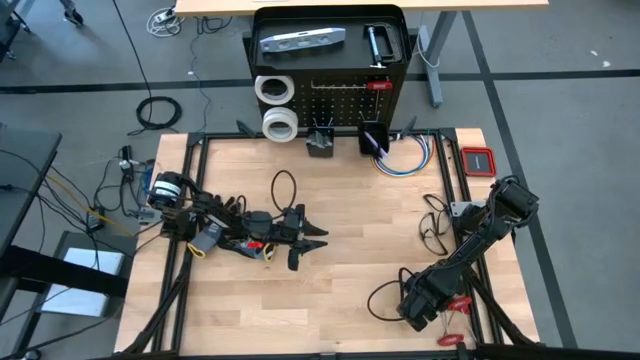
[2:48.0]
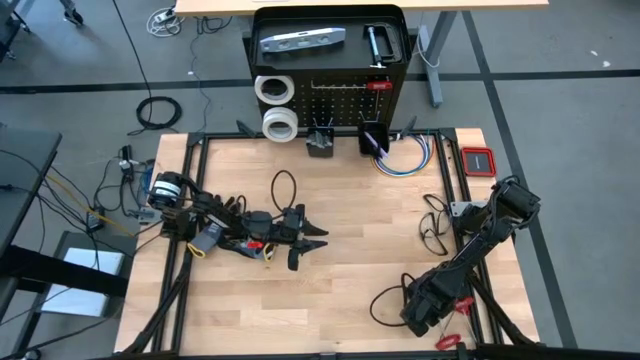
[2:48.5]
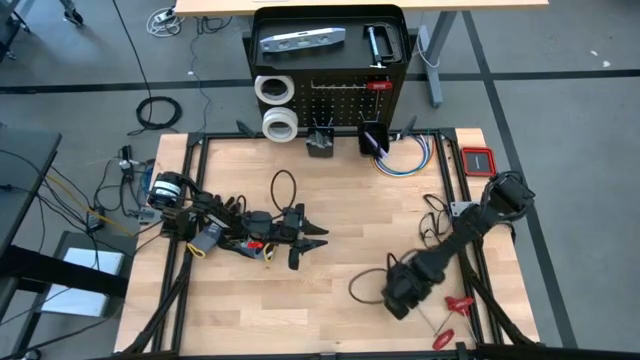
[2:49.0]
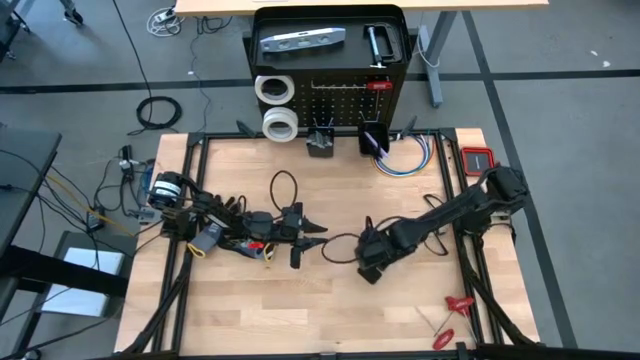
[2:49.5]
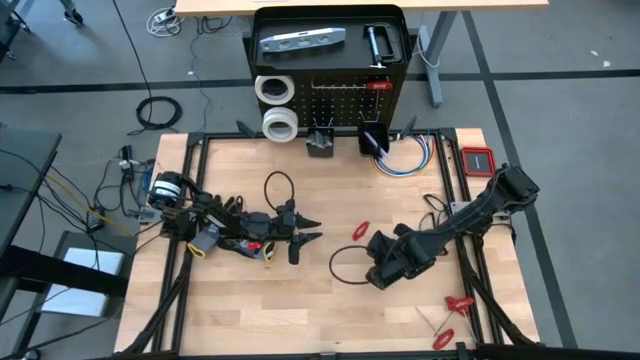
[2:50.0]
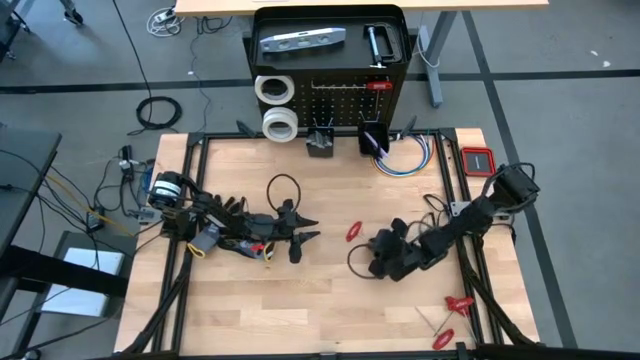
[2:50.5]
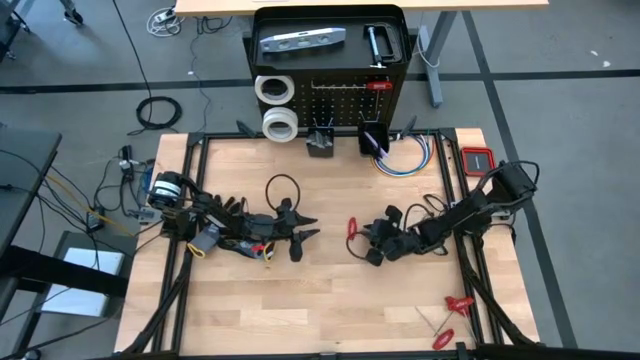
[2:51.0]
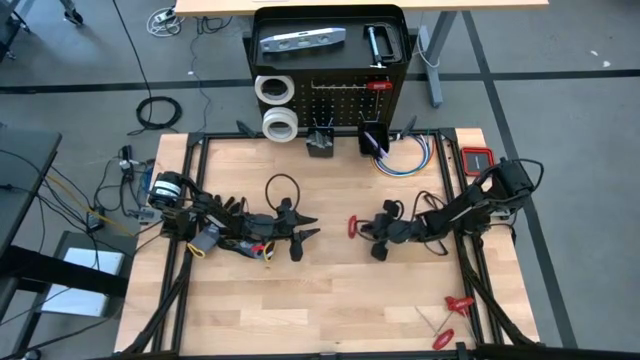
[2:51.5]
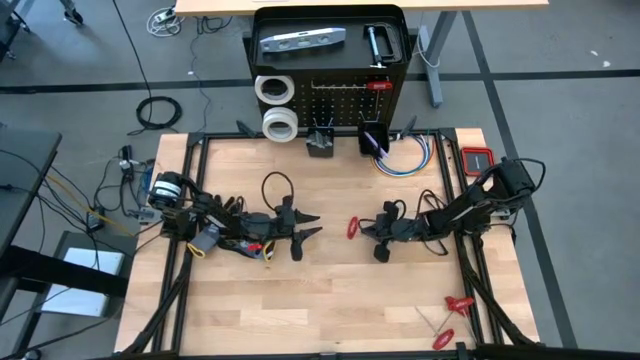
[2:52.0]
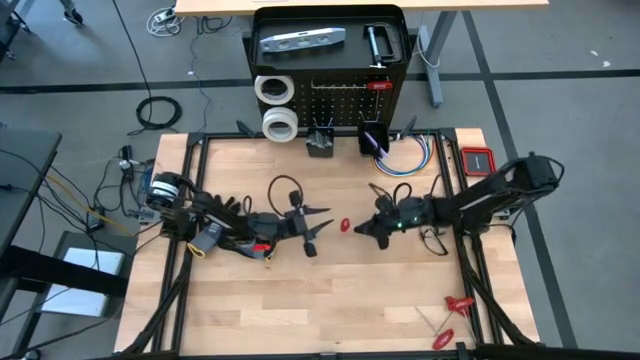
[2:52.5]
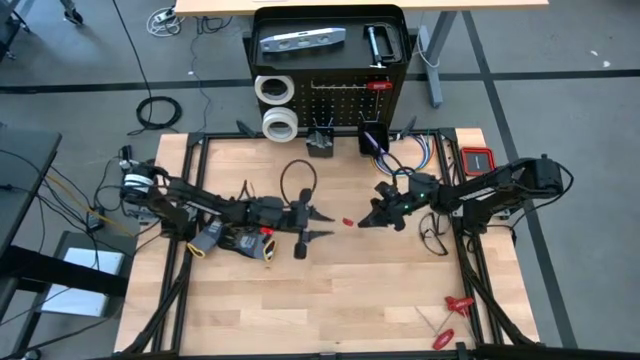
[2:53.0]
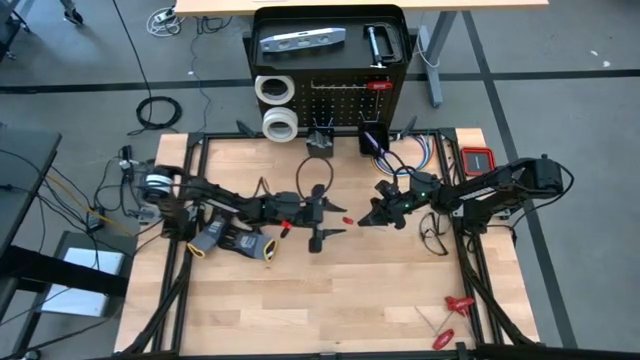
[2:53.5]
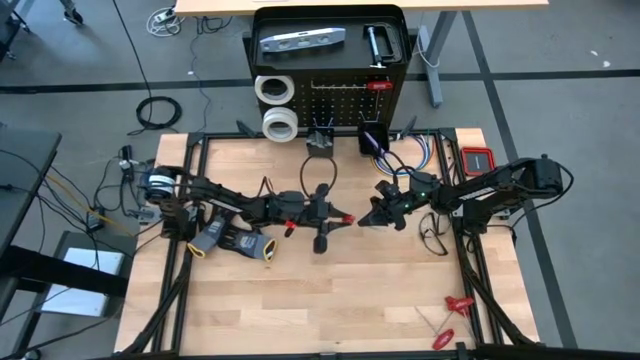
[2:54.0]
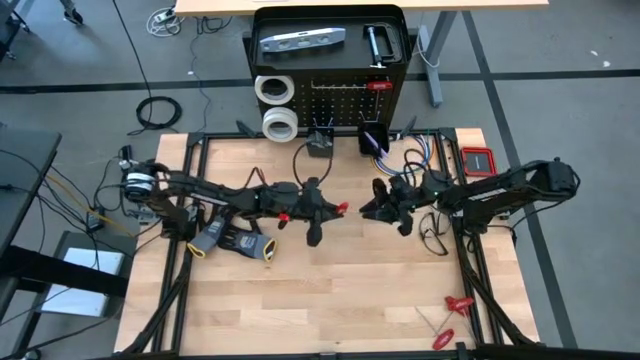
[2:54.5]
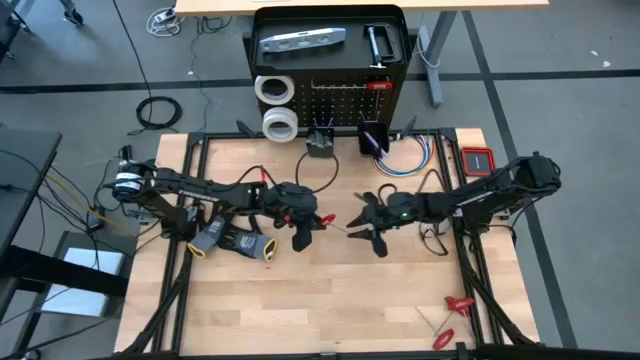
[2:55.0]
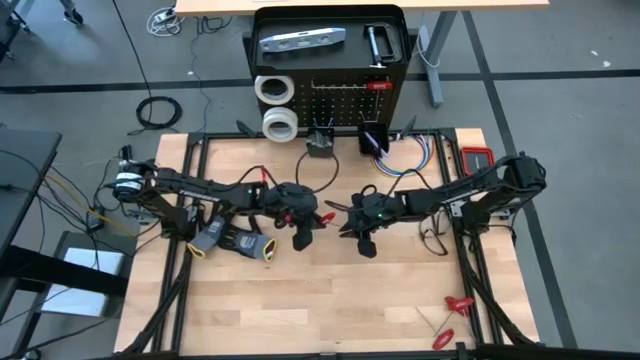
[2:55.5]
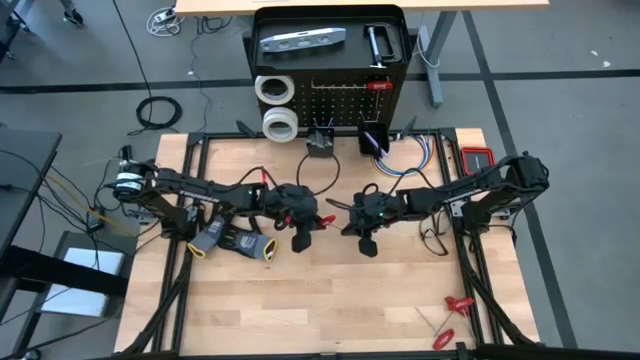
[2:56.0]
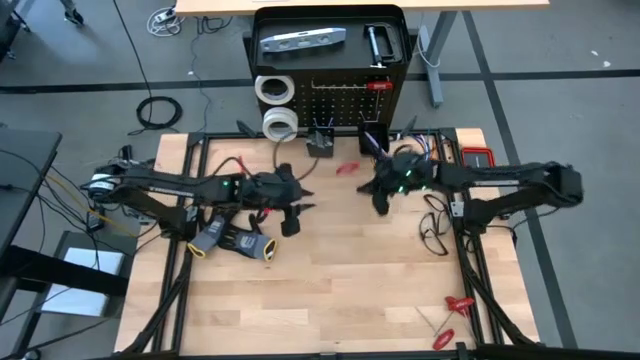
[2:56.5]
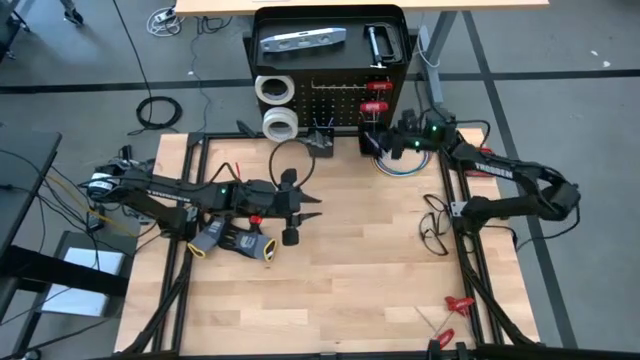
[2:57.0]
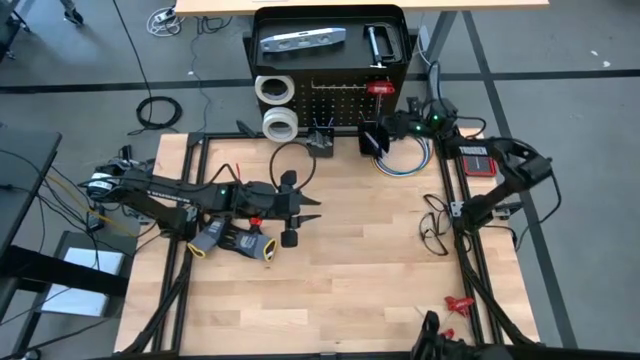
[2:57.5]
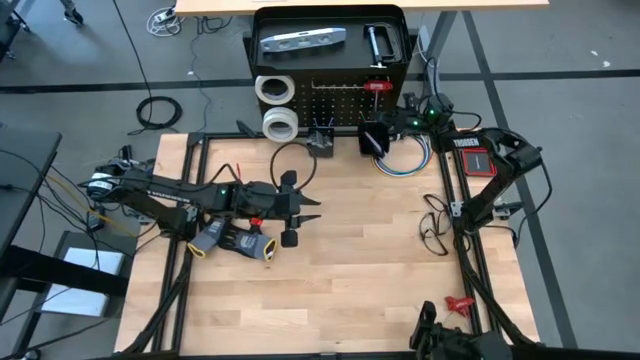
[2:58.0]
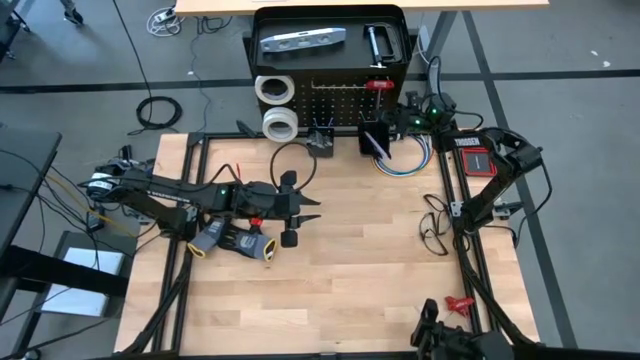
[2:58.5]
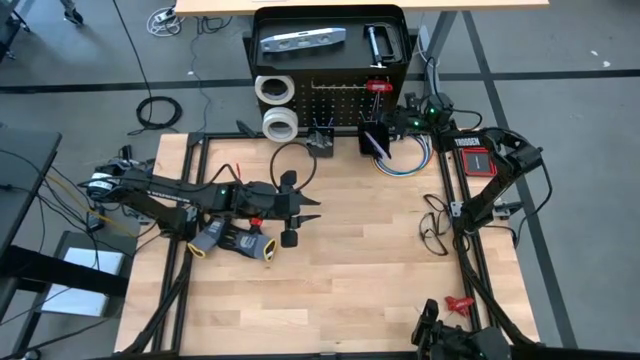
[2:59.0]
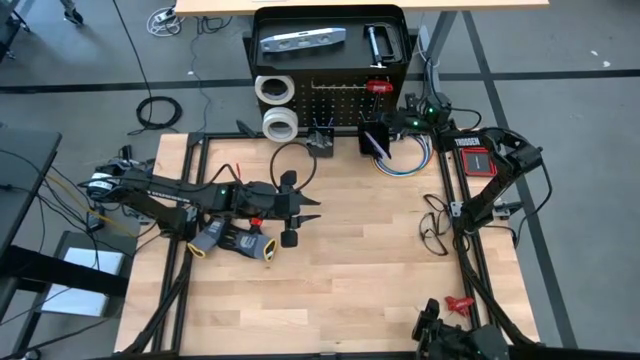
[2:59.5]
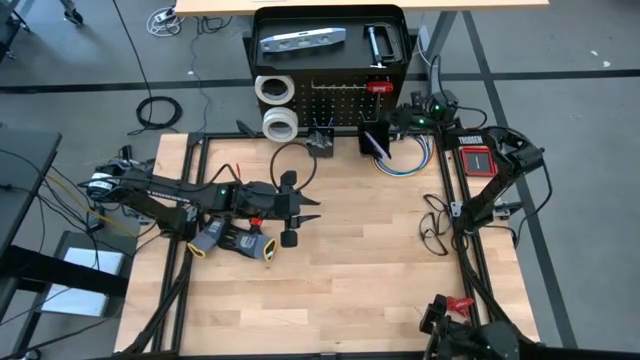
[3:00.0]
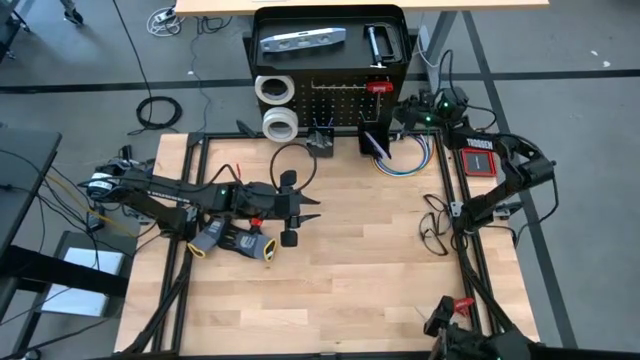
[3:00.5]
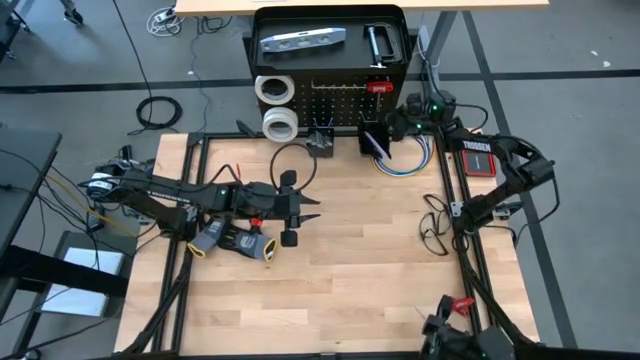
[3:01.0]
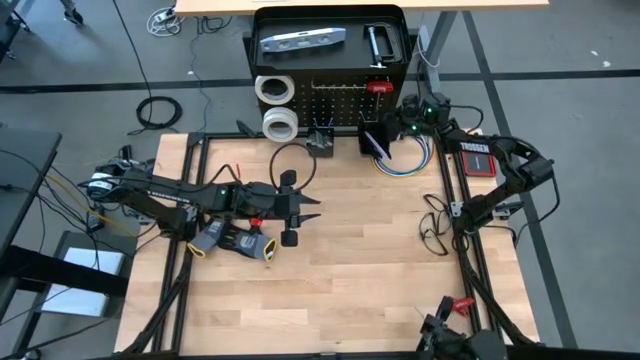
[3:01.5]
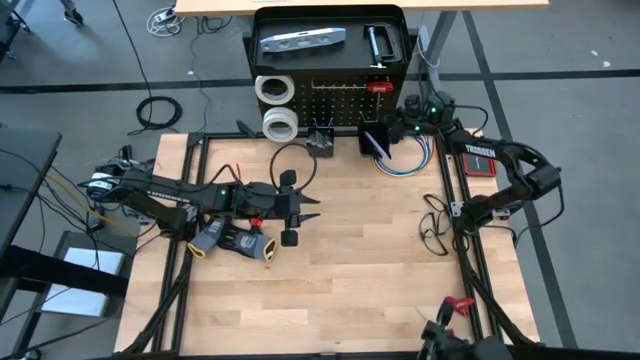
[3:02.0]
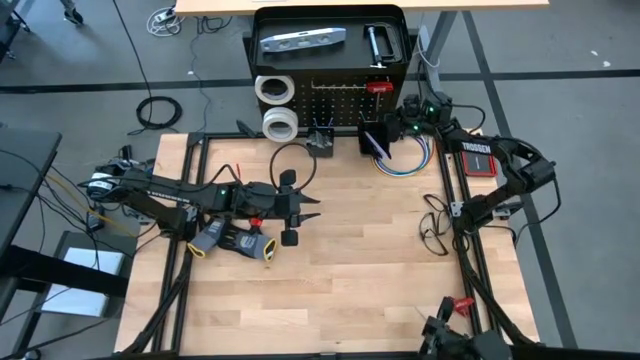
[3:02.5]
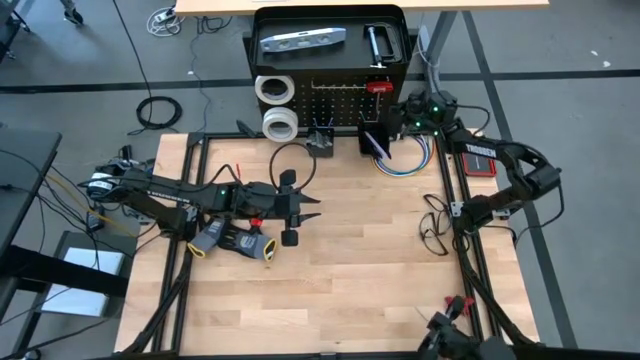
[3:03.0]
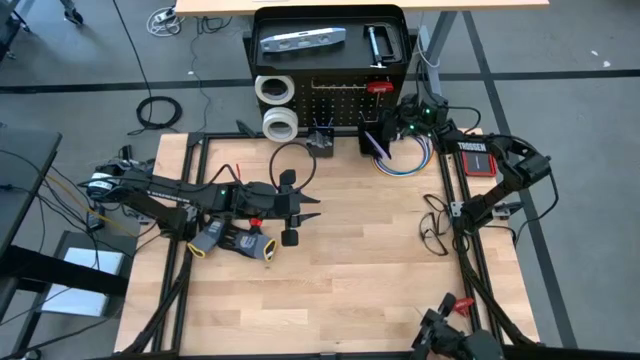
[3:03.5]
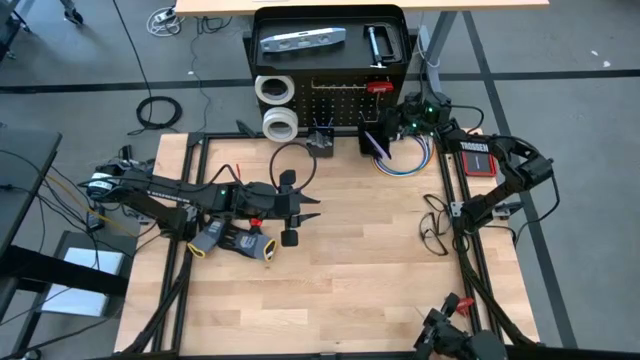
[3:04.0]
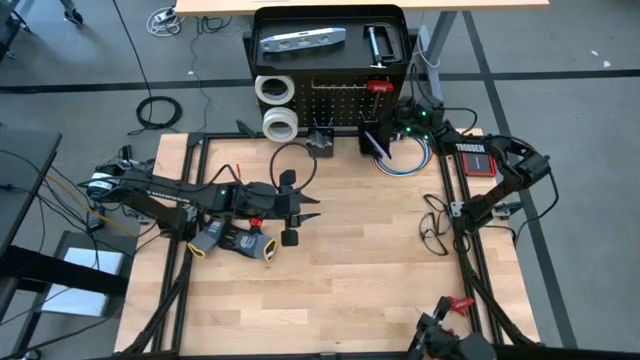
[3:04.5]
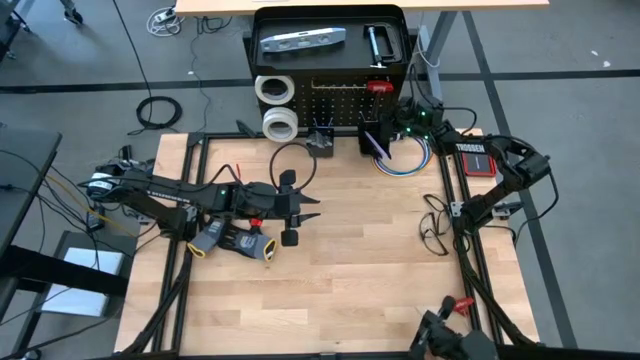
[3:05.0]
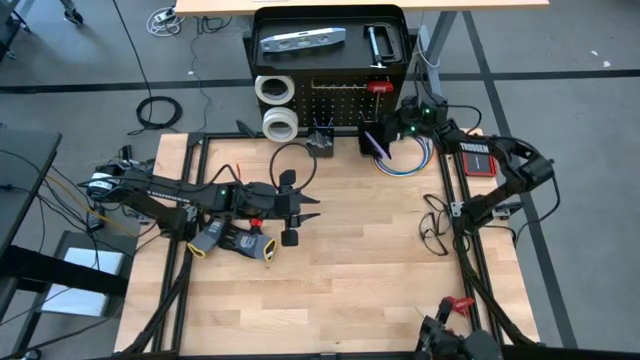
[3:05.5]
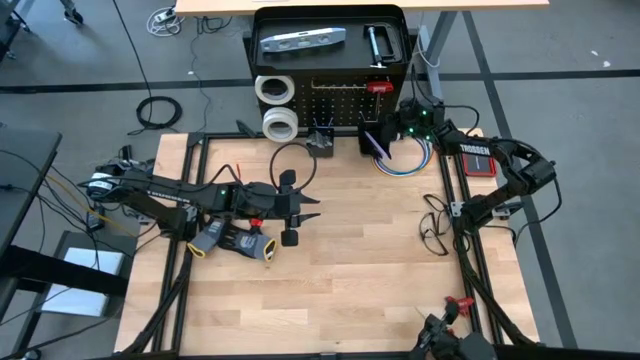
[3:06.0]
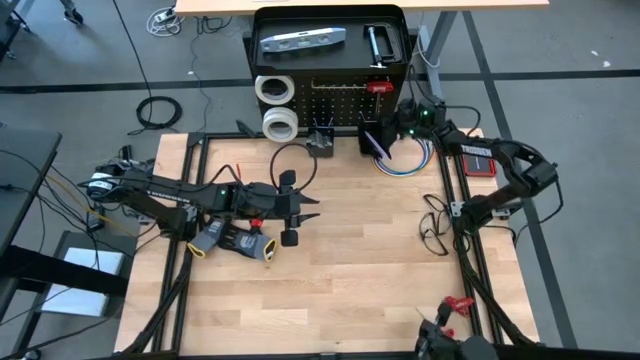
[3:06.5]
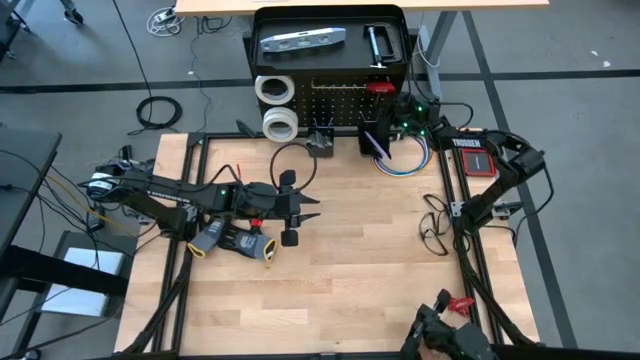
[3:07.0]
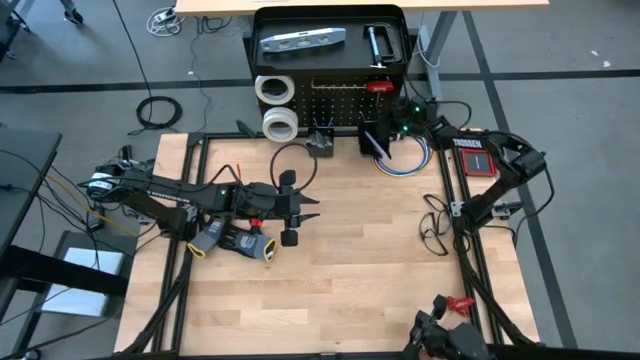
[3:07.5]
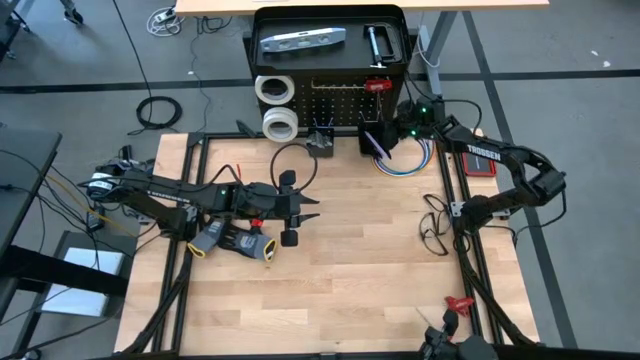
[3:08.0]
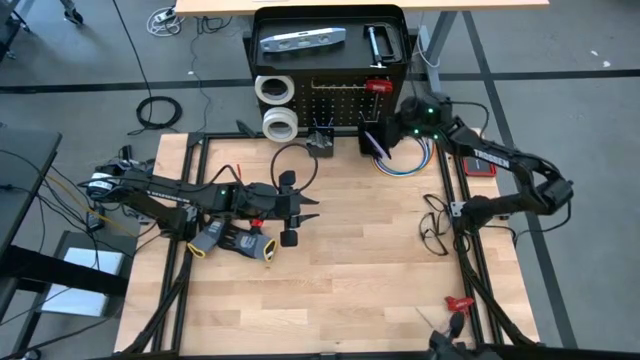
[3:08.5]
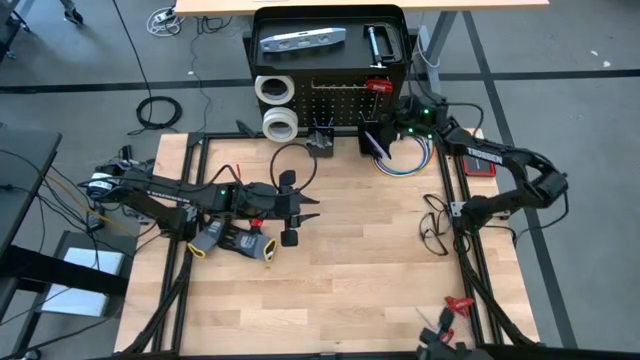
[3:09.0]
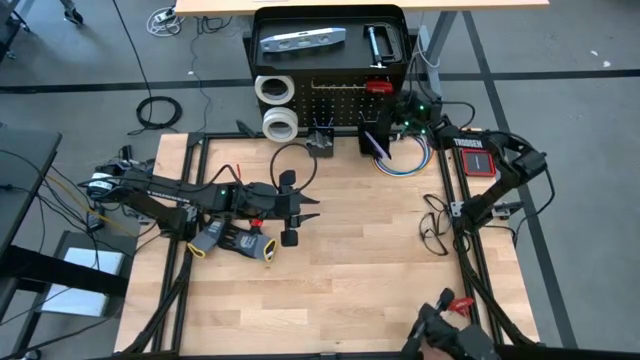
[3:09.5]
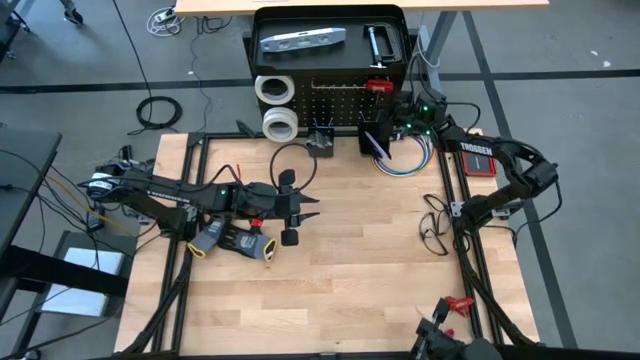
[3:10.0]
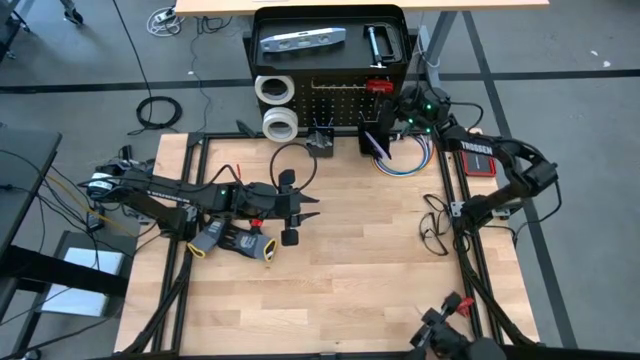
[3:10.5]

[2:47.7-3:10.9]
Task: Hang tools onto peg board
Hang the allen wrench on the peg board
